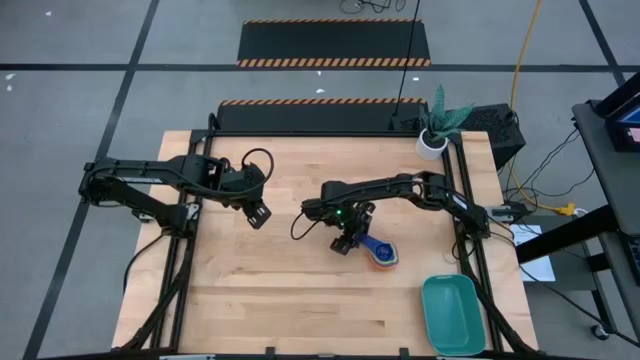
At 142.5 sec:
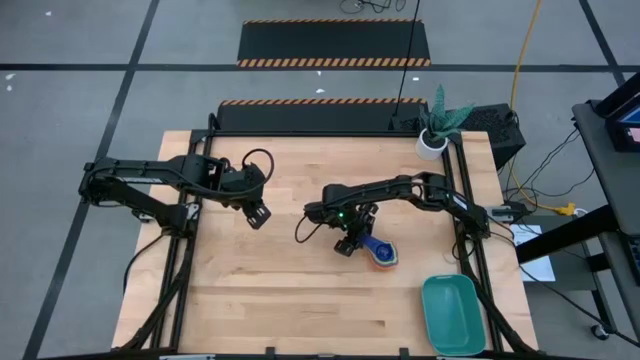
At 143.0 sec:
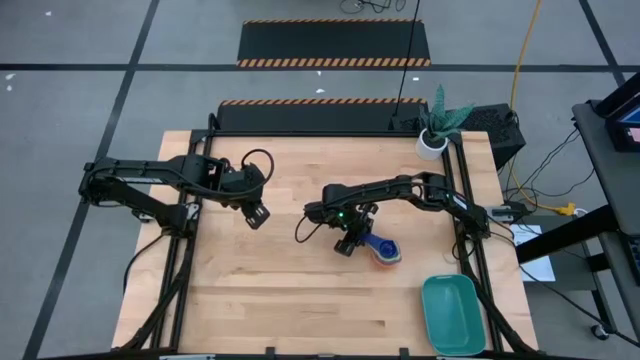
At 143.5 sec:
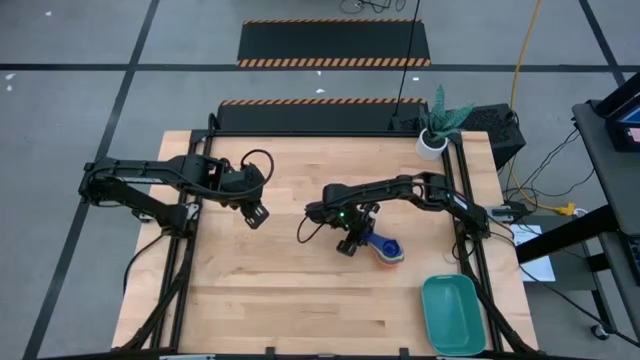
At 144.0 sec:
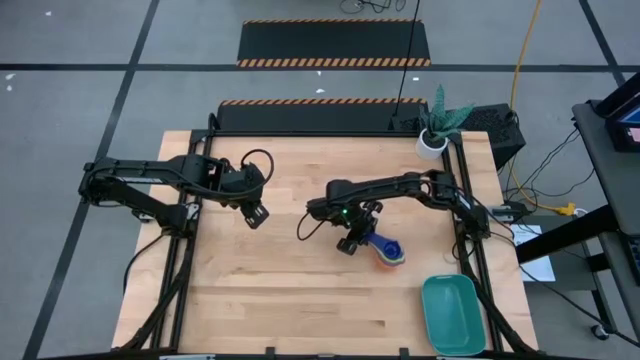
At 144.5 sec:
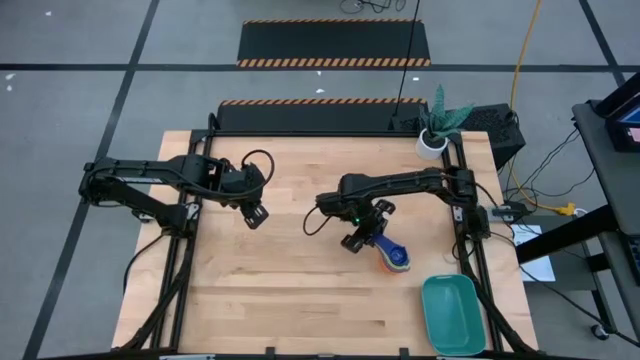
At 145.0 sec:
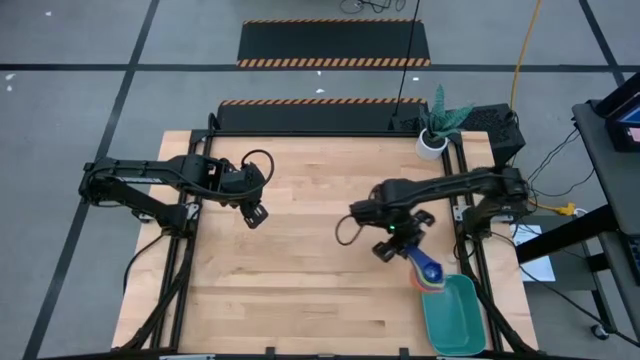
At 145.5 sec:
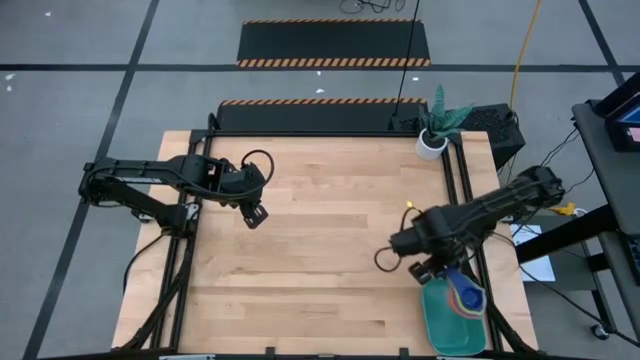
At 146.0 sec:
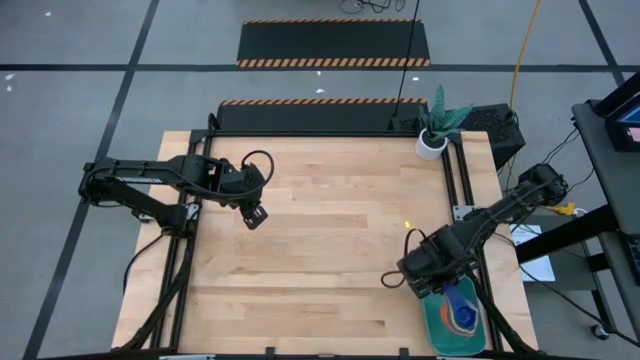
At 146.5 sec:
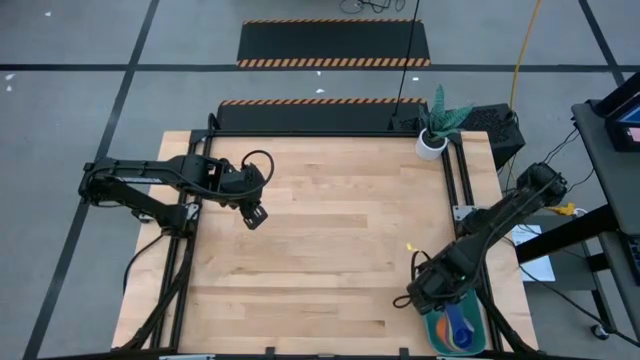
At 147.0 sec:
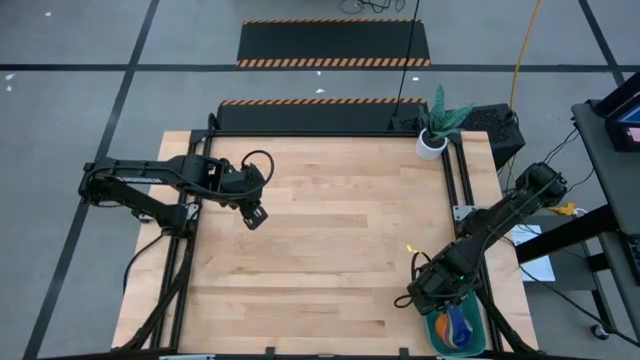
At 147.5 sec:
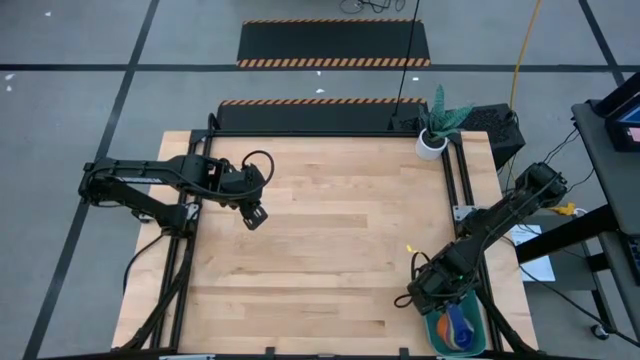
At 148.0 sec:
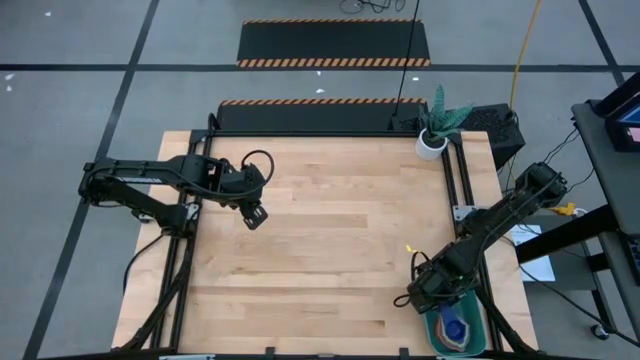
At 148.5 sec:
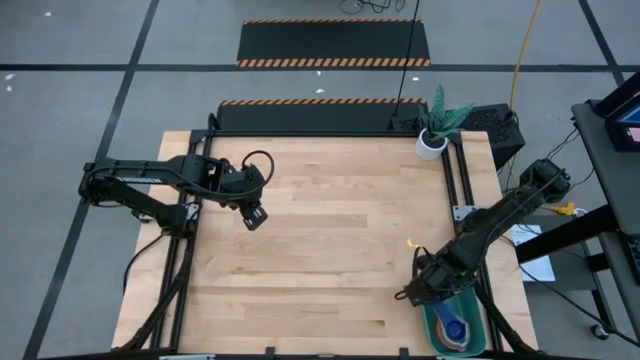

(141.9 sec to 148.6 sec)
Task: Nest measuring cups in basket
Put the stacked measuring cups into the green bin

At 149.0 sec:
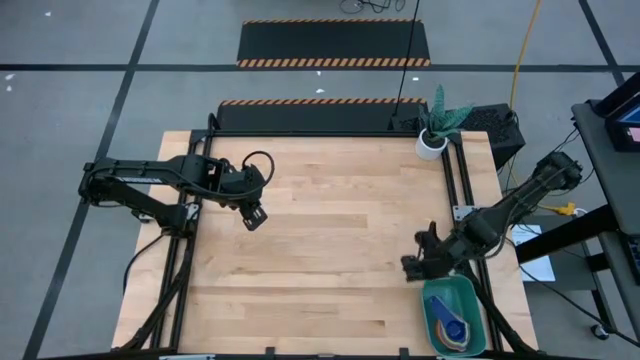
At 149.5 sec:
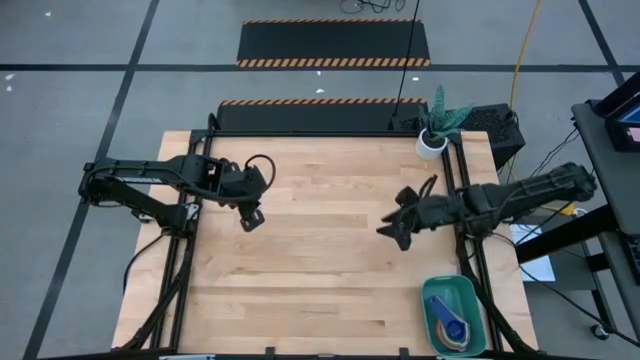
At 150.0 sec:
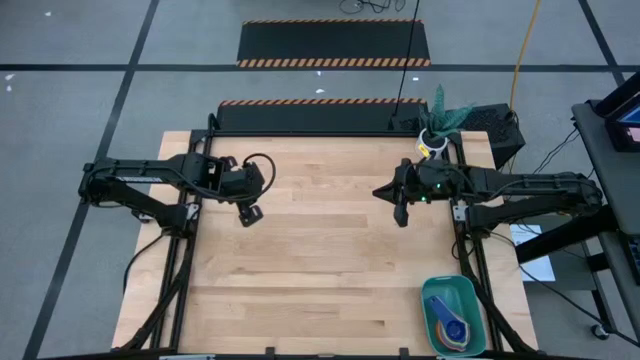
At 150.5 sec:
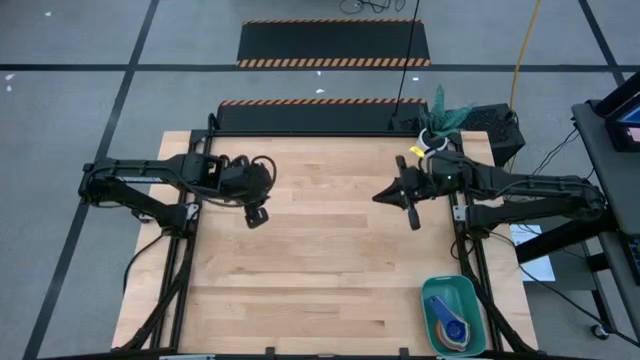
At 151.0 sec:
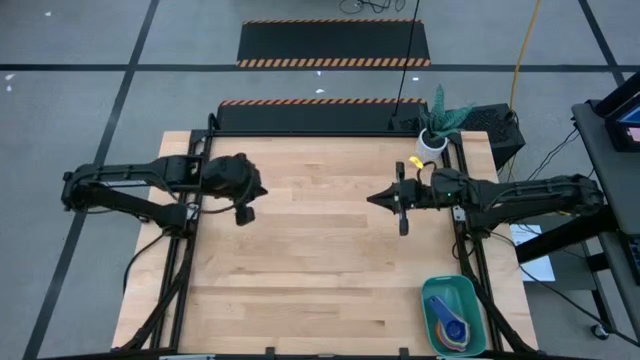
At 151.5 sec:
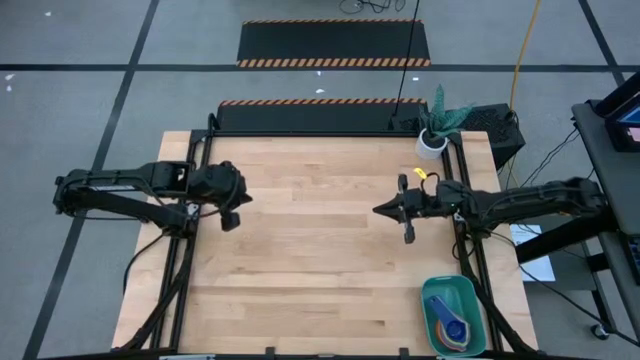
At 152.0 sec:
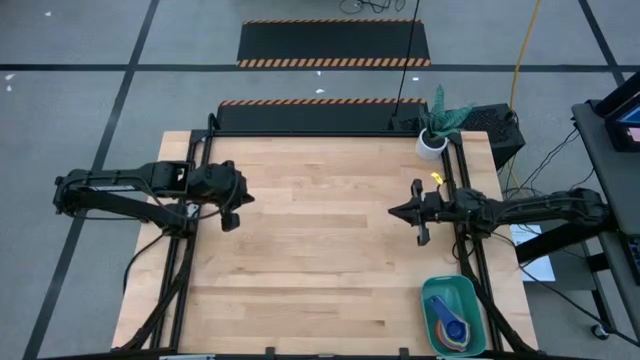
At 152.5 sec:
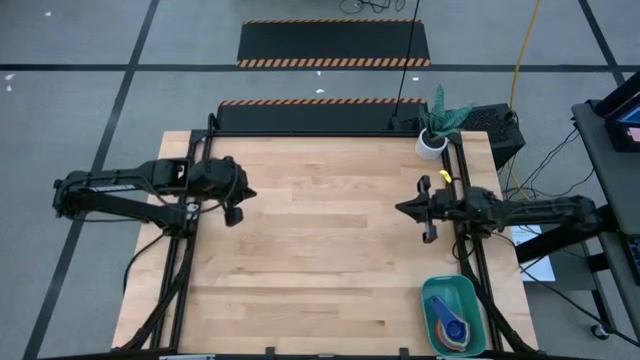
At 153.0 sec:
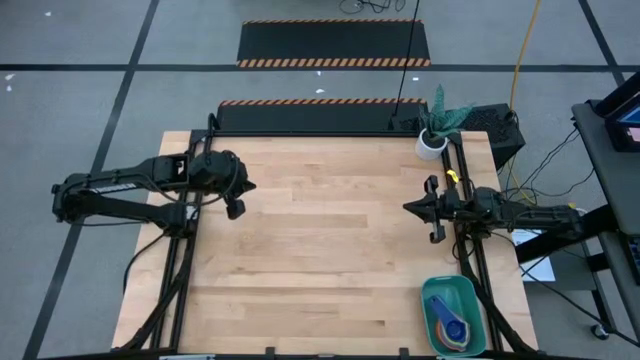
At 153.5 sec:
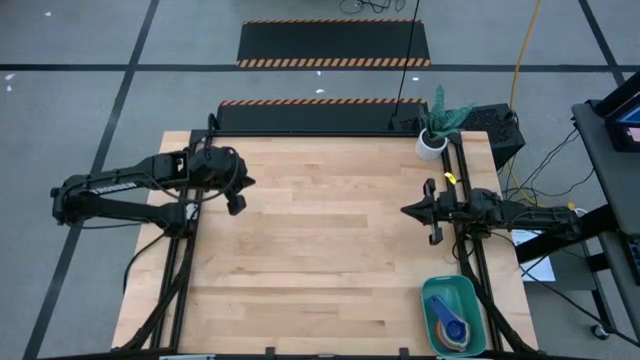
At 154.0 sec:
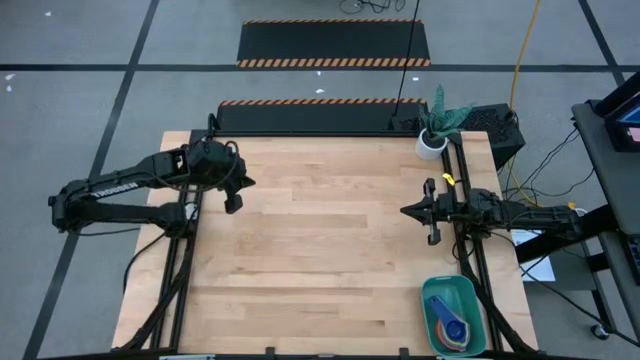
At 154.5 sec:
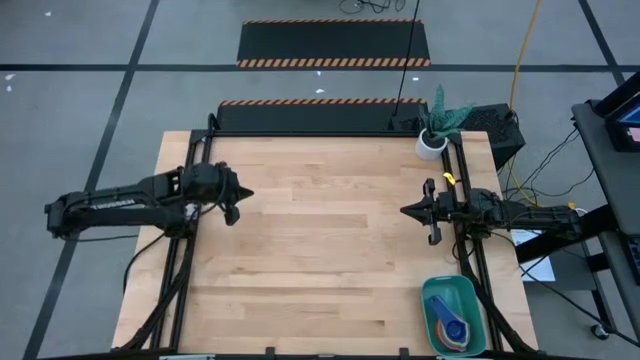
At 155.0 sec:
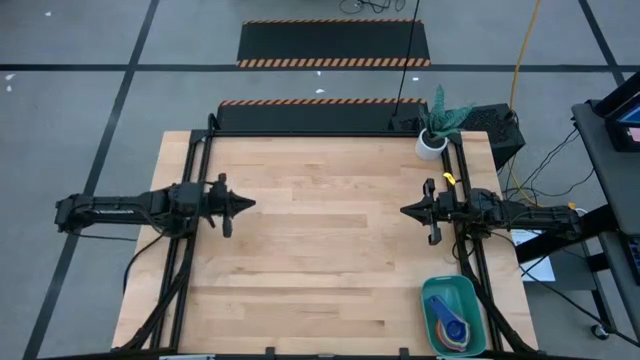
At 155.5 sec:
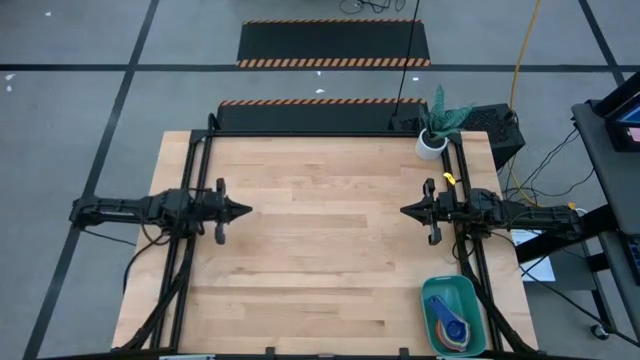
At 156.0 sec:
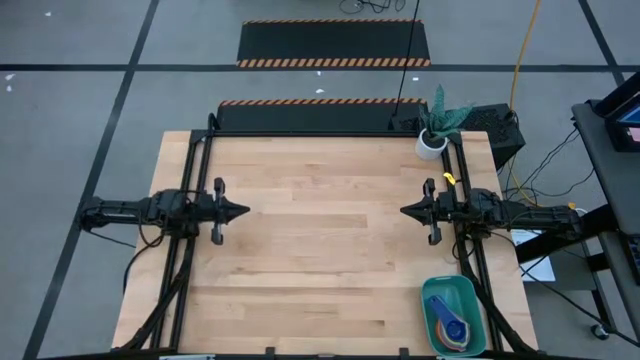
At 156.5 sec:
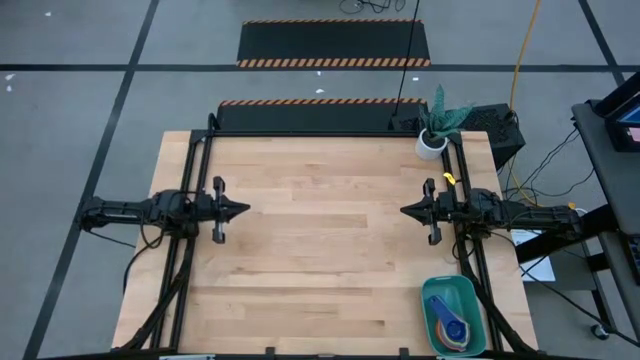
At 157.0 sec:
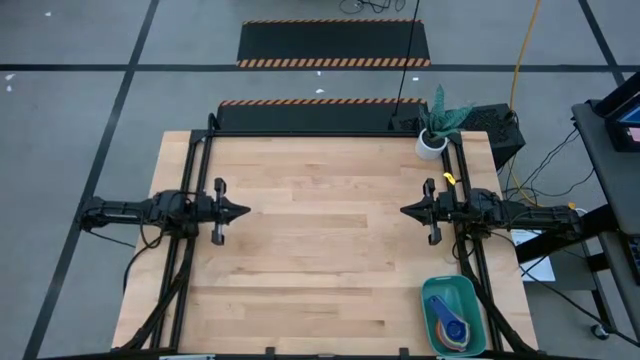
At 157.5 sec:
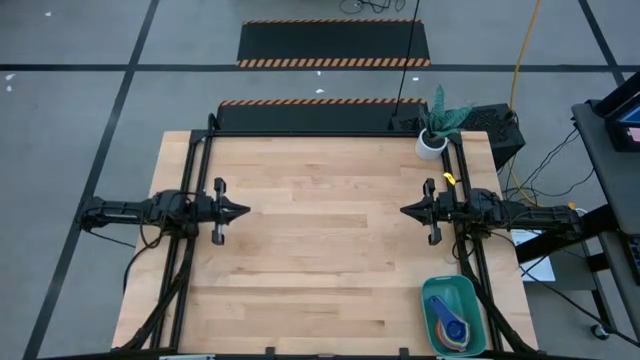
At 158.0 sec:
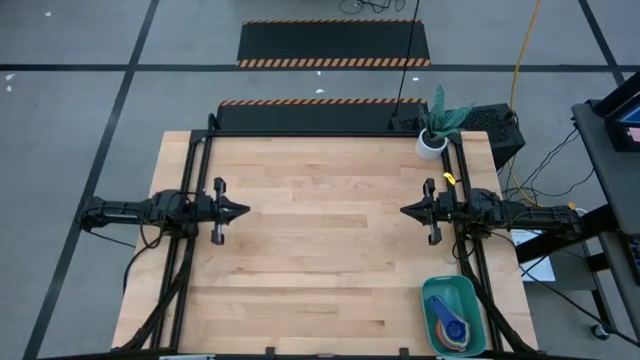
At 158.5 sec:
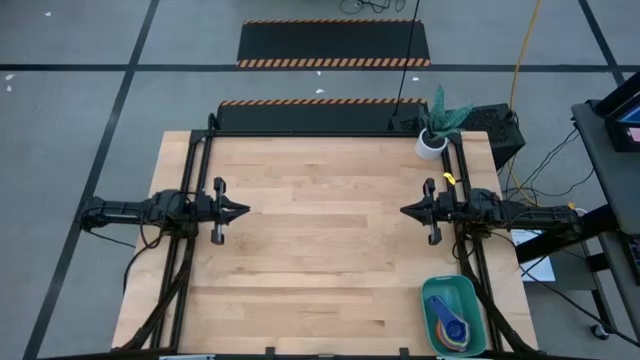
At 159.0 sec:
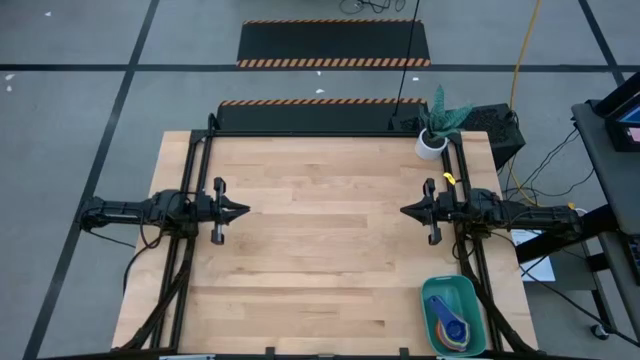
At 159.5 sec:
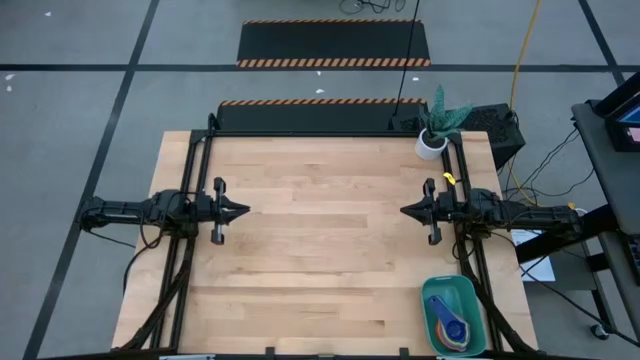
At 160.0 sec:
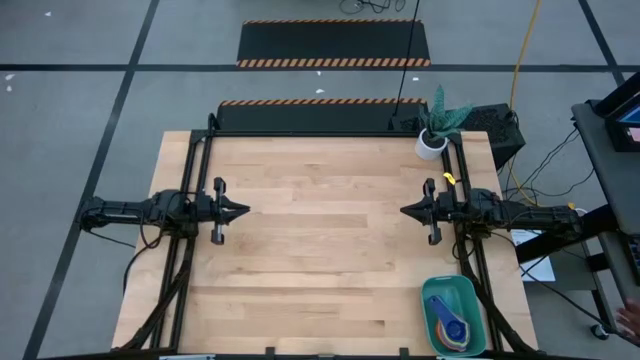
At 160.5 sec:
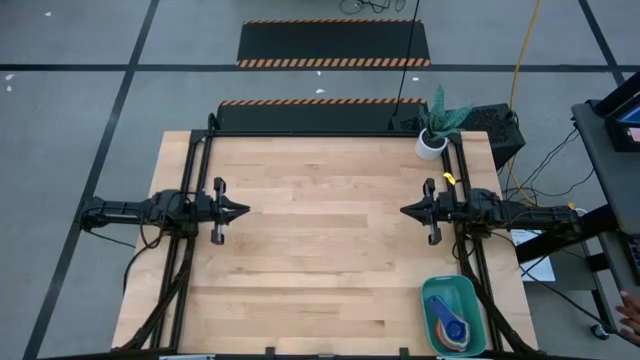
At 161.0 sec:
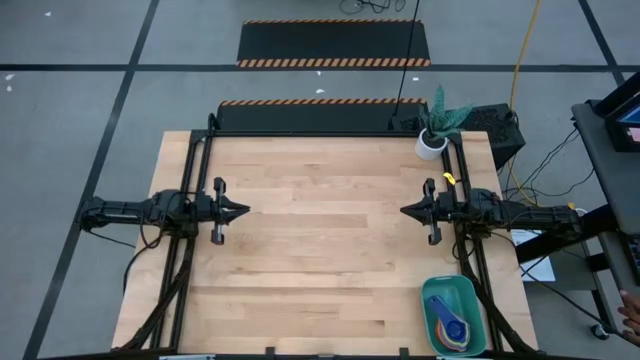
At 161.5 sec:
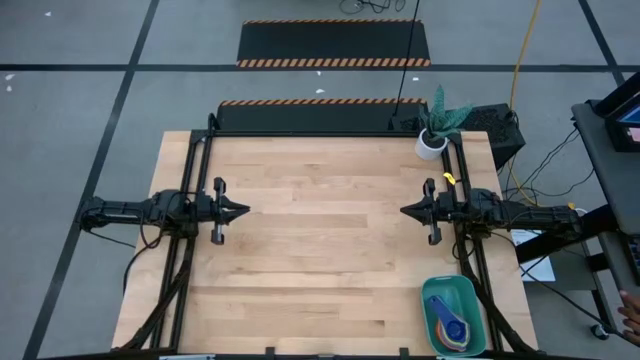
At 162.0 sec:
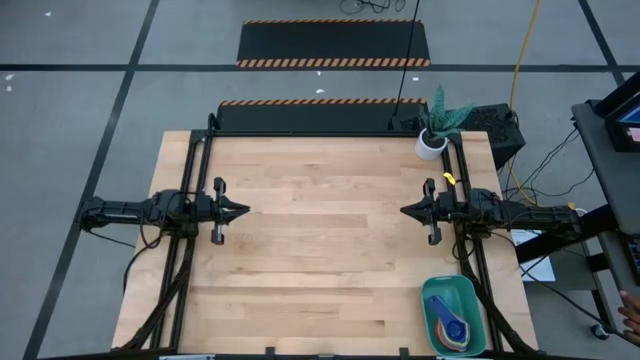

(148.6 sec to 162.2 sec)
Return to Home Position
